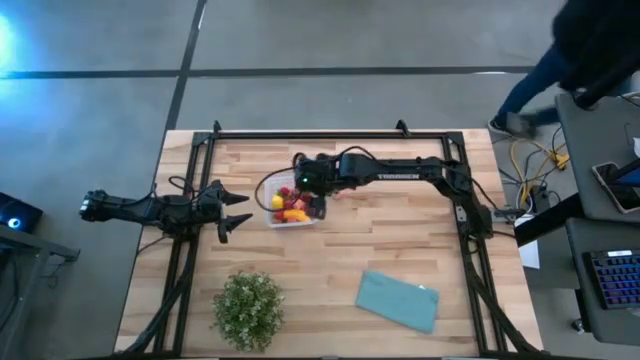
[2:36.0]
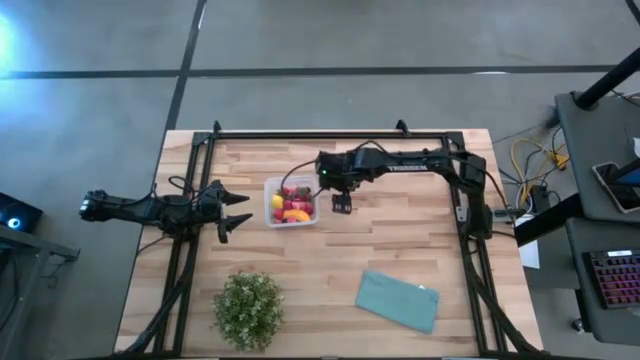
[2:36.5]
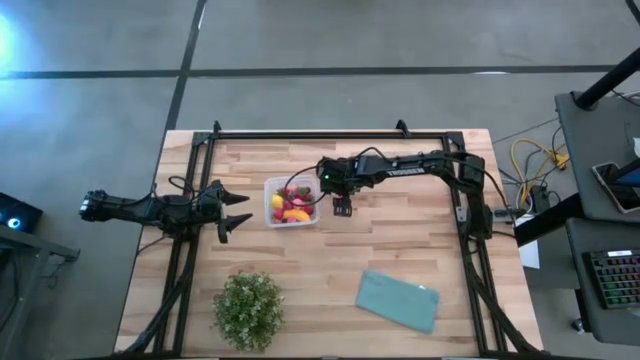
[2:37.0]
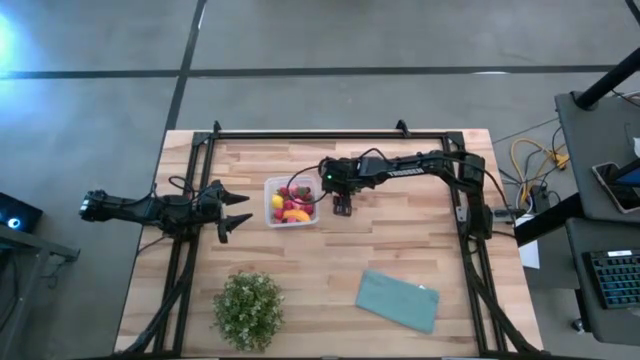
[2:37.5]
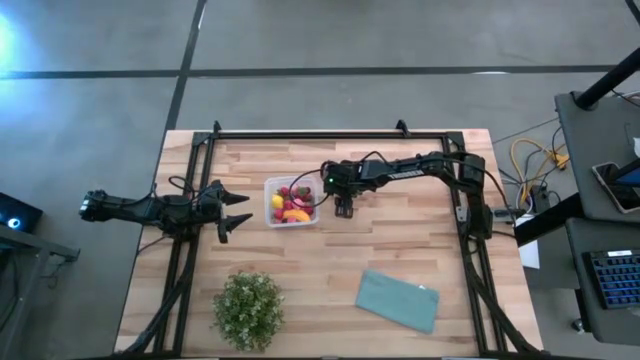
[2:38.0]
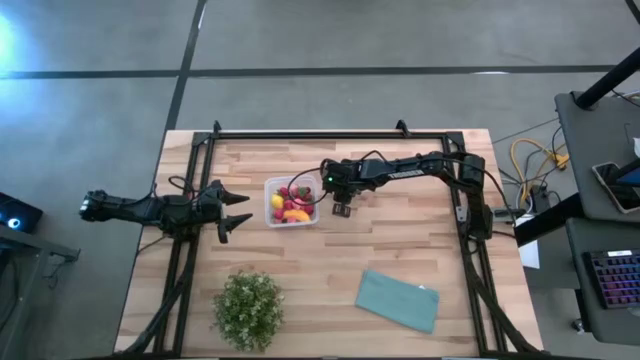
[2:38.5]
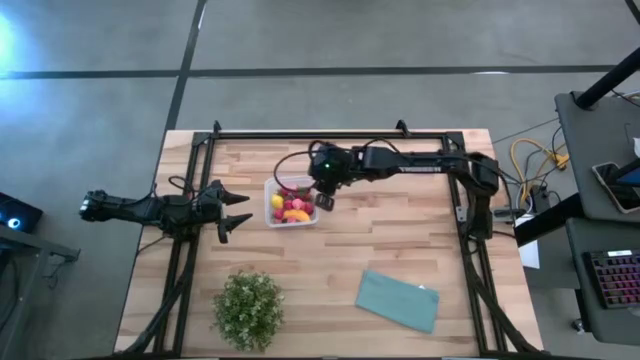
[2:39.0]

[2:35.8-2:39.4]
Task: Pick and placing Produce into tupperware
Put the pink peach into the transparent bin

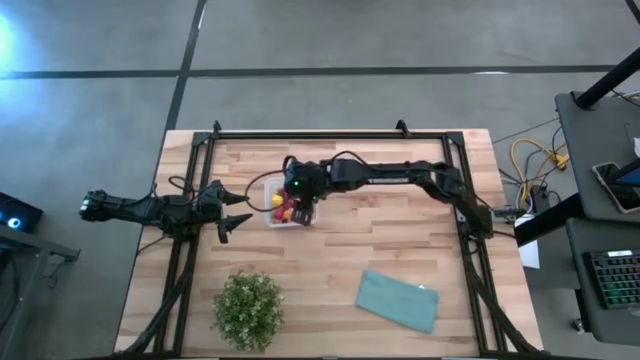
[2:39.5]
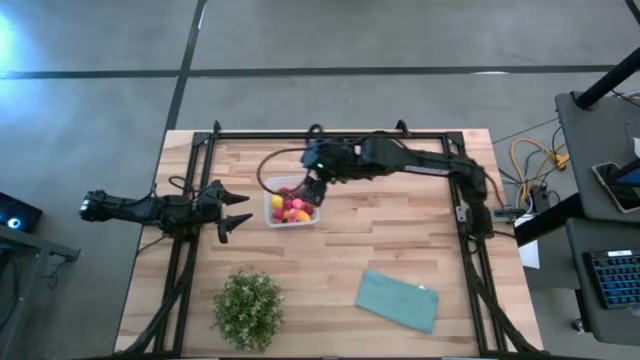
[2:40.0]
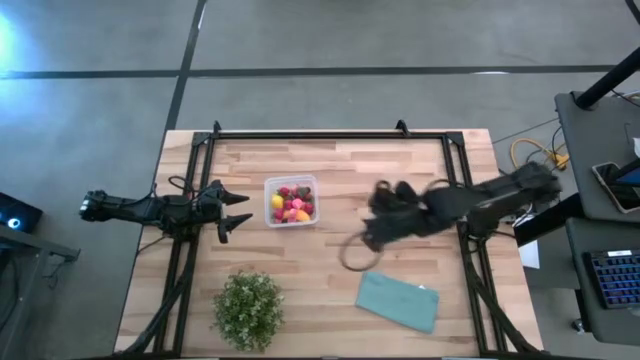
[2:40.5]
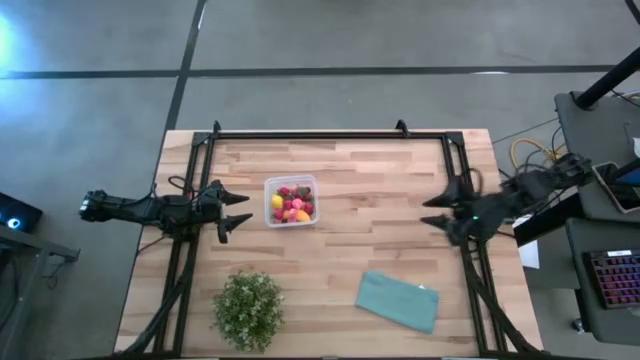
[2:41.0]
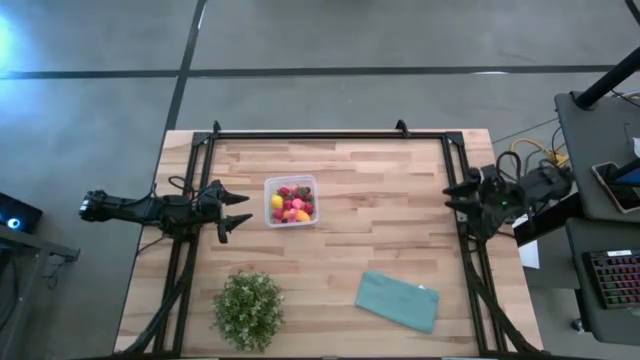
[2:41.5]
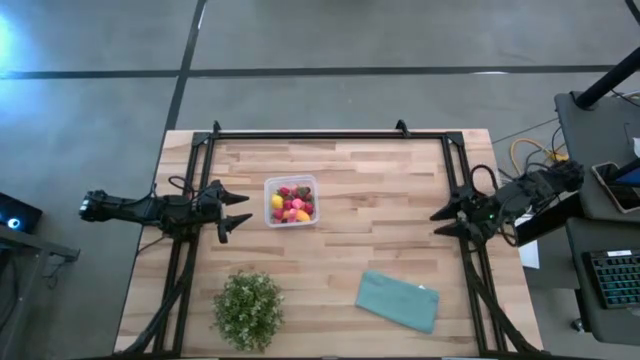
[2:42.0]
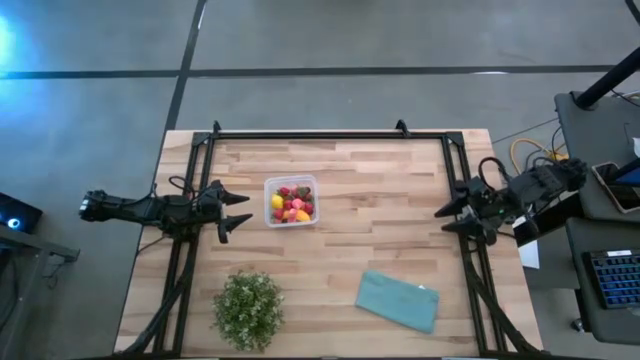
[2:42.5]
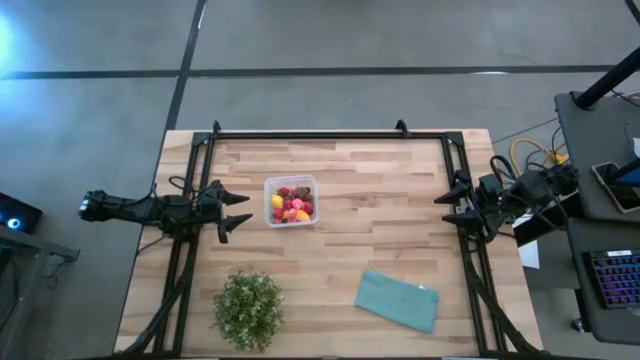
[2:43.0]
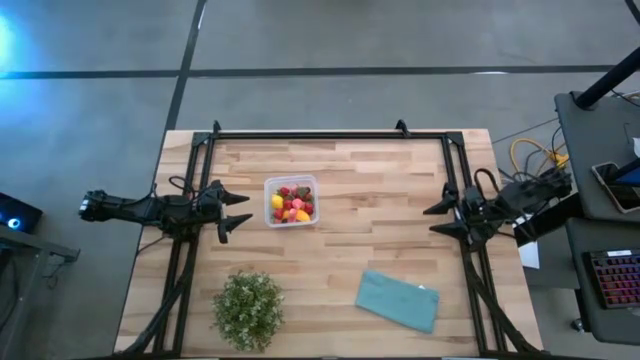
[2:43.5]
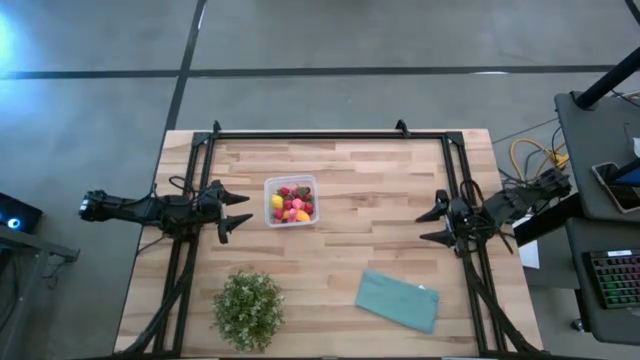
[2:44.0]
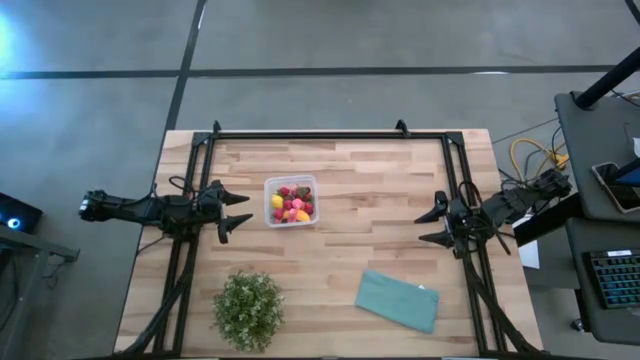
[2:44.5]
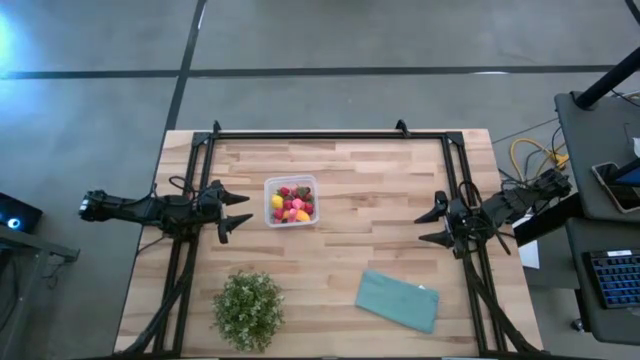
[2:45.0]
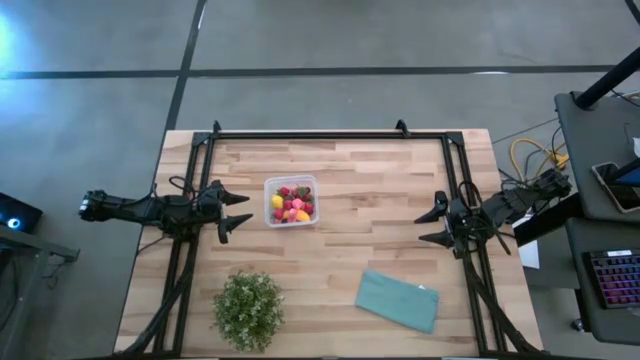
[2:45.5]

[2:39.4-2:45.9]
Return to Home Position

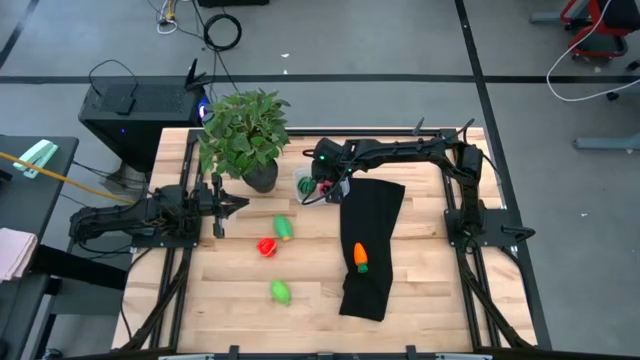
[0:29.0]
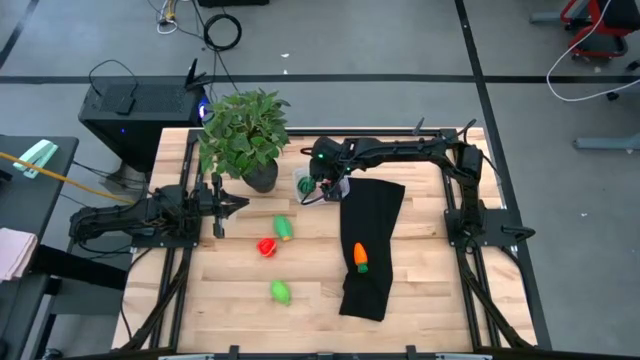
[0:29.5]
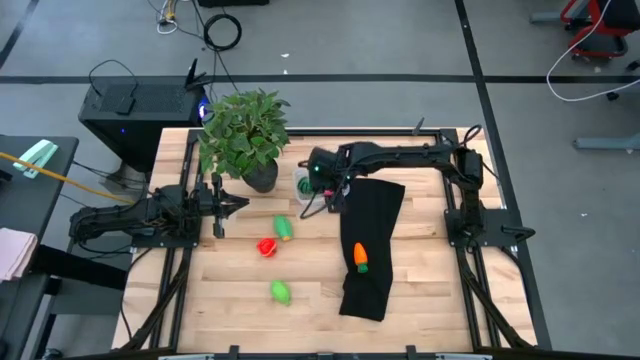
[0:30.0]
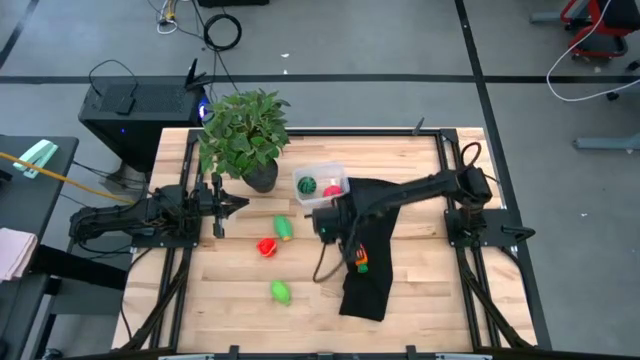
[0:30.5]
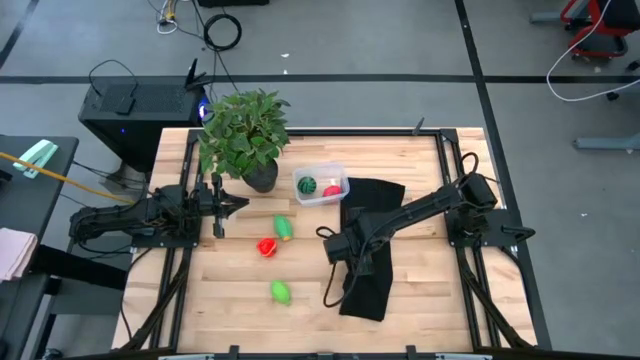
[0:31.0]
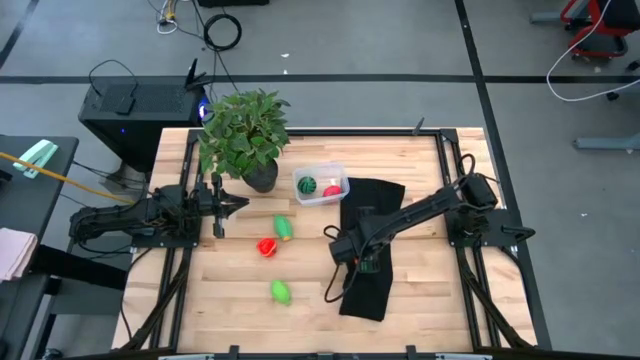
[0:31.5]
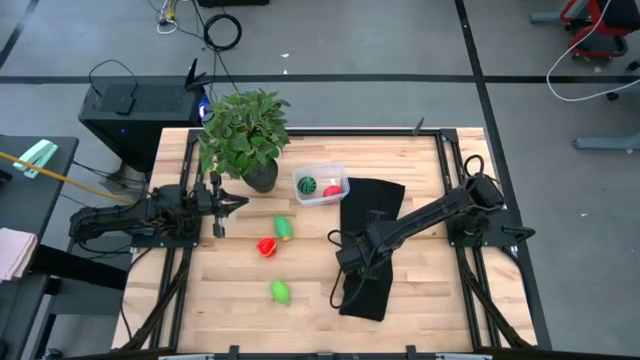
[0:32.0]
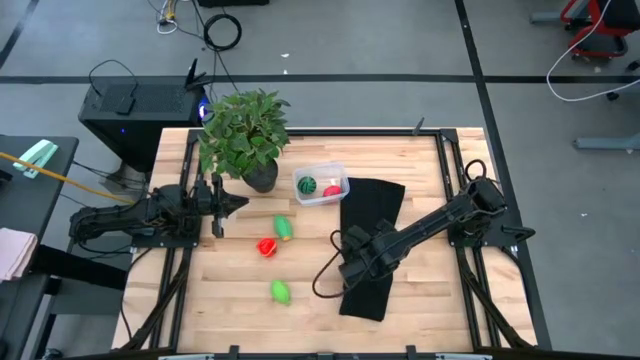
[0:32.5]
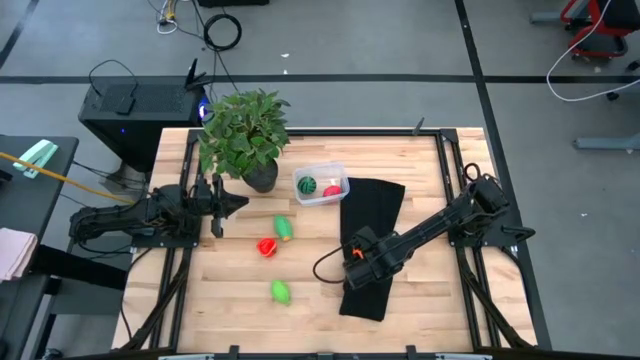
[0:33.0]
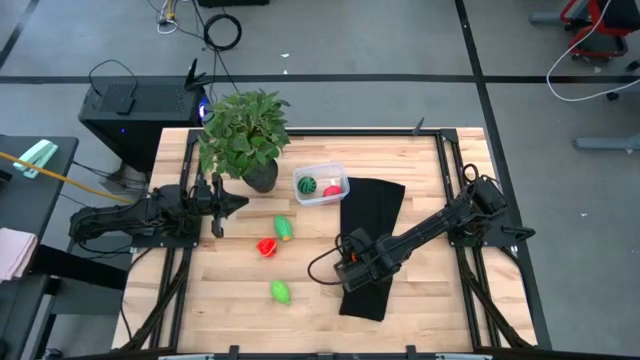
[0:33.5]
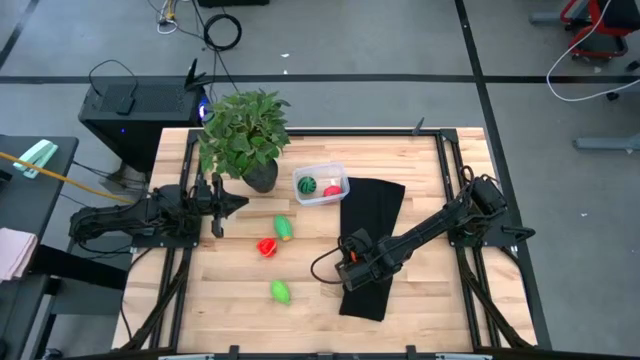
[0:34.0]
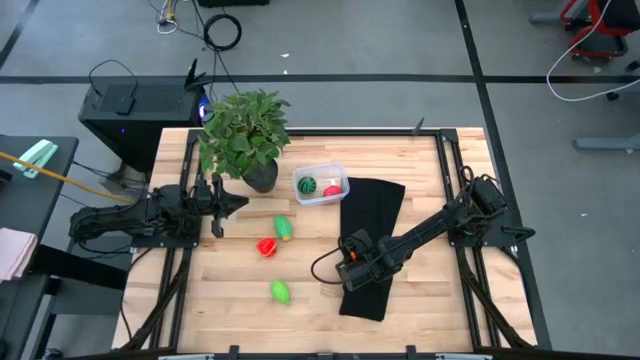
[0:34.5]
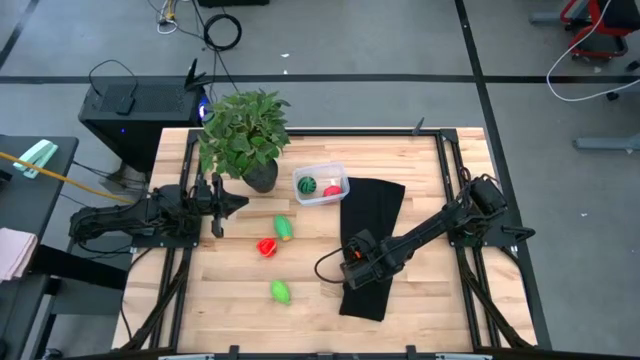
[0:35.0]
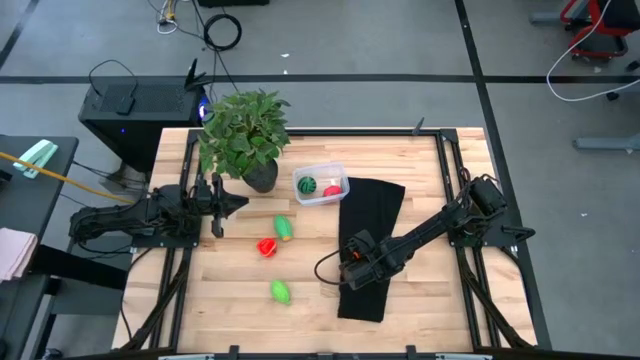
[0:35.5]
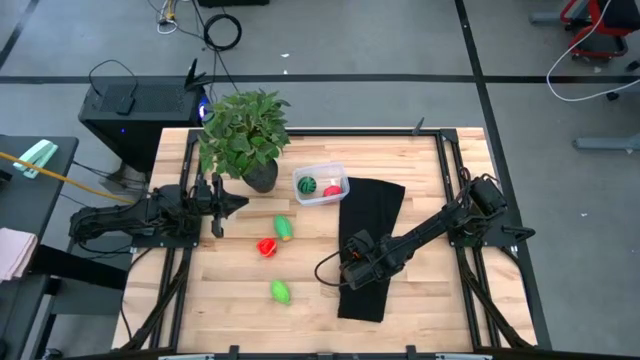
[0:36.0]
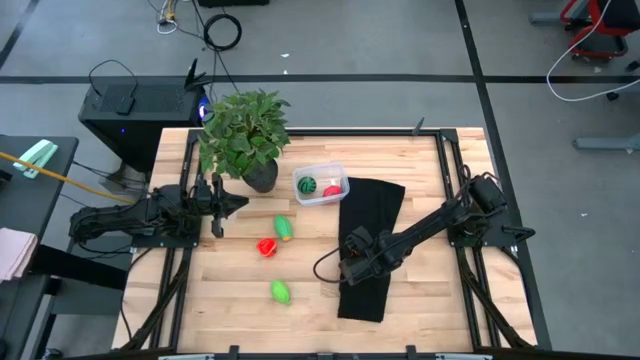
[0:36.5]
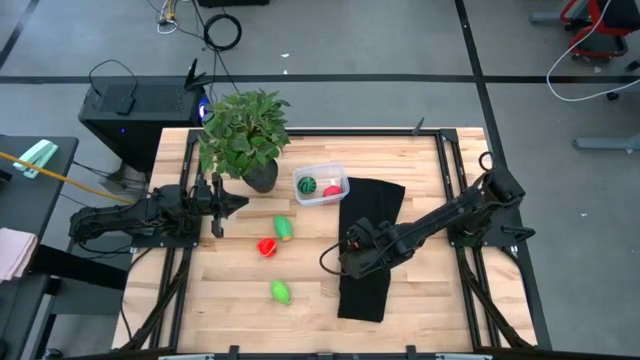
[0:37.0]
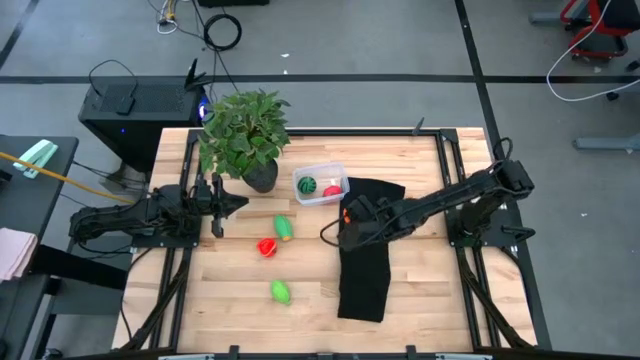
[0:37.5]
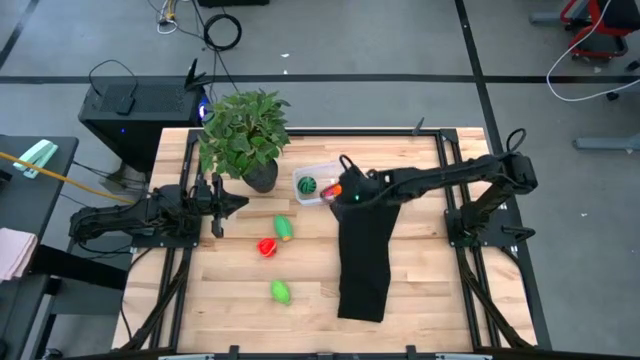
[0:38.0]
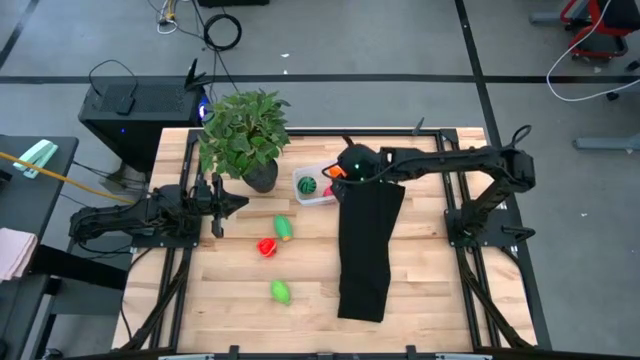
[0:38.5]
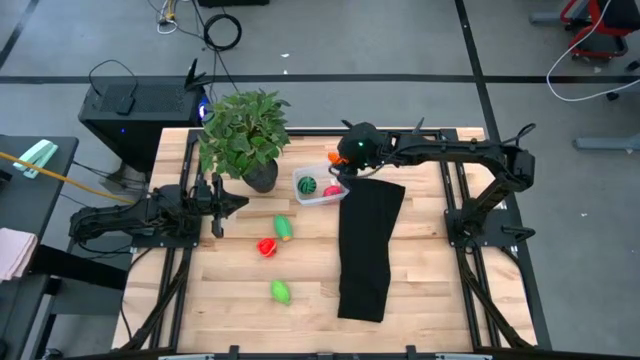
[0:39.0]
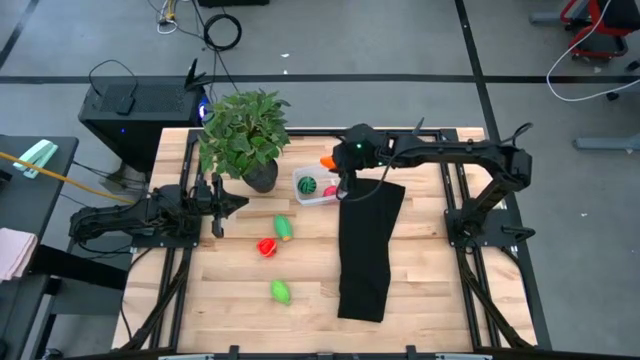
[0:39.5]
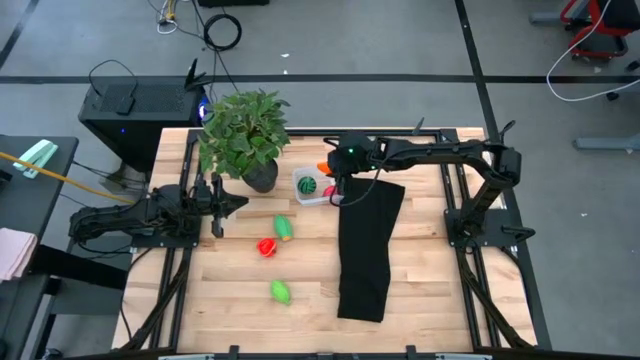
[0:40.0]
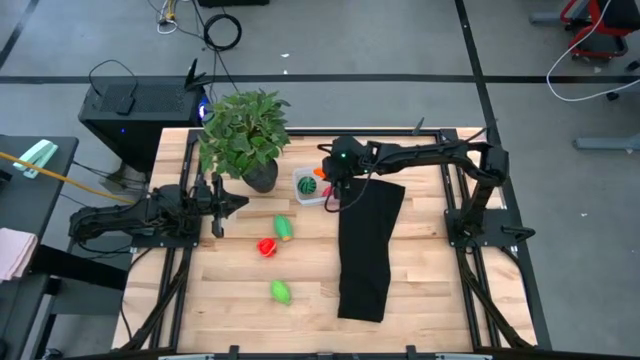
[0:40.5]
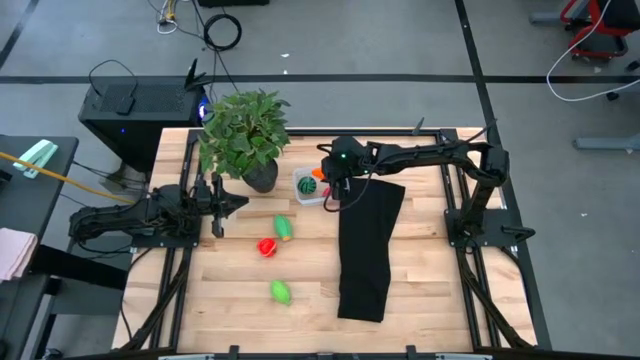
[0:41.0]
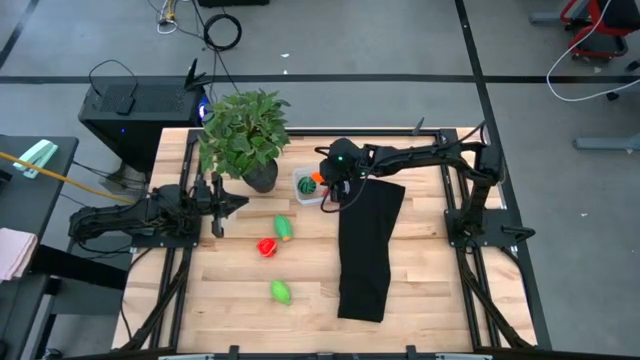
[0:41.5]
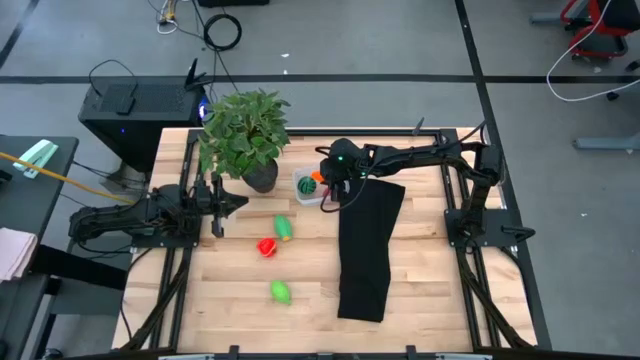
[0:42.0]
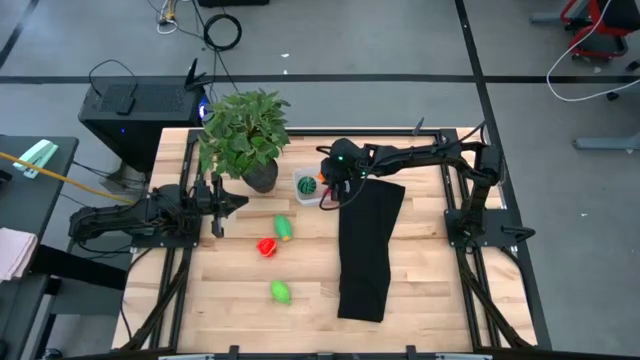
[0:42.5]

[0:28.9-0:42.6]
Task: Pick and placing Produce into tupperware
Put the orange carrot into the transparent bin
